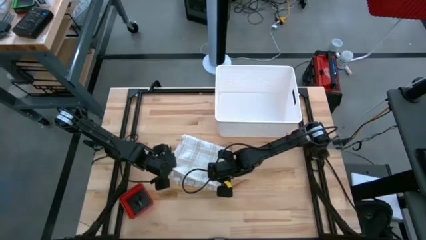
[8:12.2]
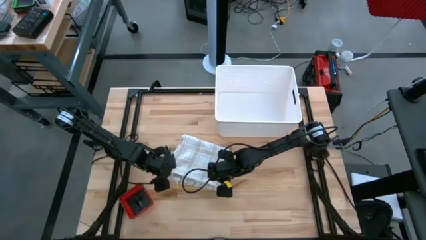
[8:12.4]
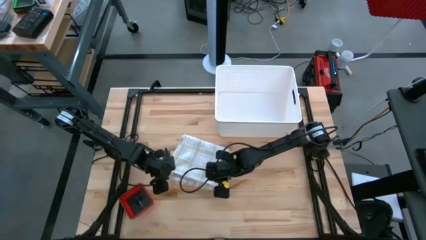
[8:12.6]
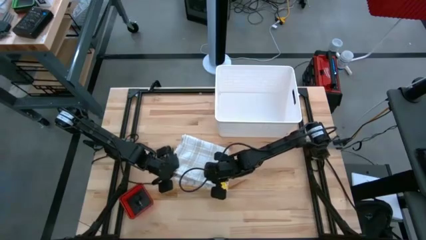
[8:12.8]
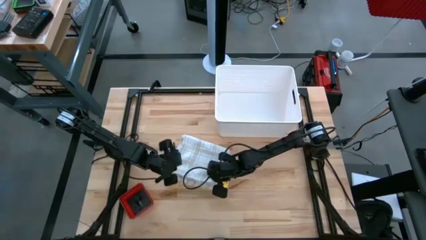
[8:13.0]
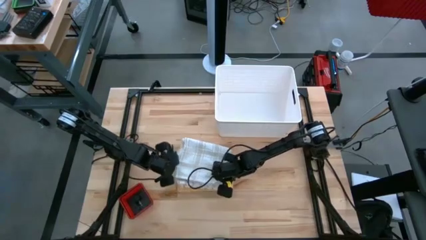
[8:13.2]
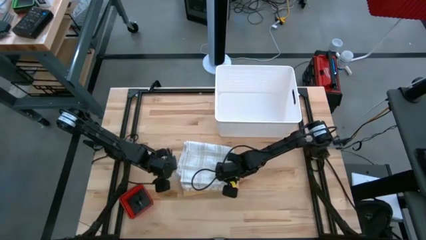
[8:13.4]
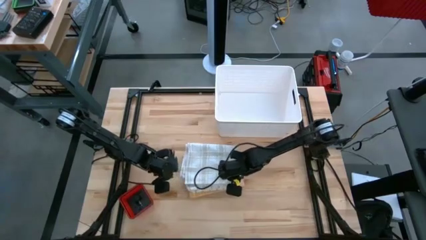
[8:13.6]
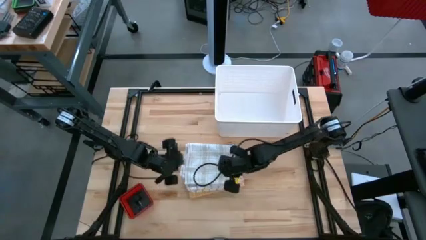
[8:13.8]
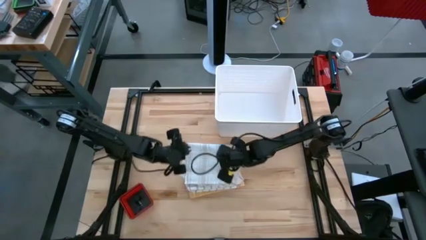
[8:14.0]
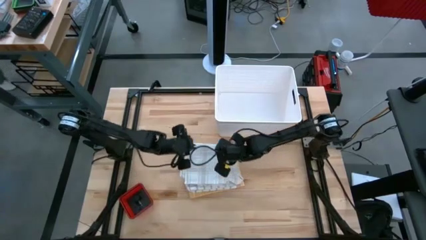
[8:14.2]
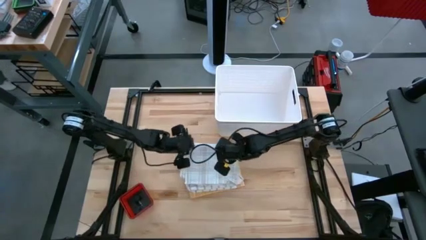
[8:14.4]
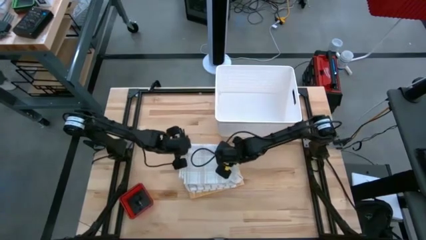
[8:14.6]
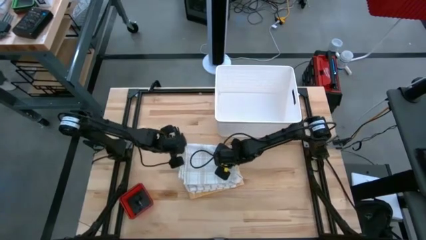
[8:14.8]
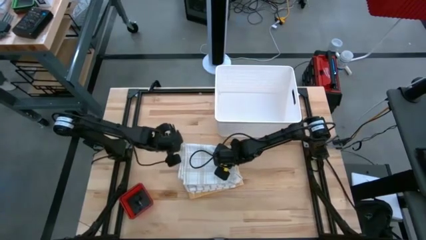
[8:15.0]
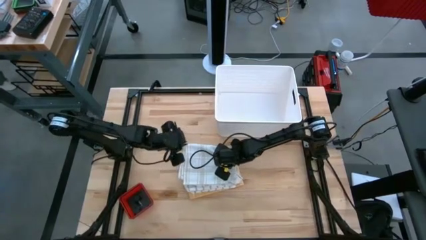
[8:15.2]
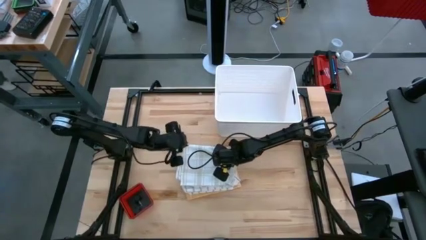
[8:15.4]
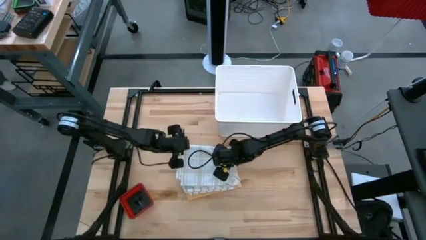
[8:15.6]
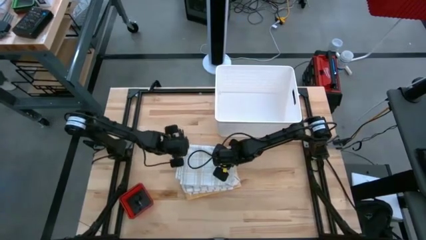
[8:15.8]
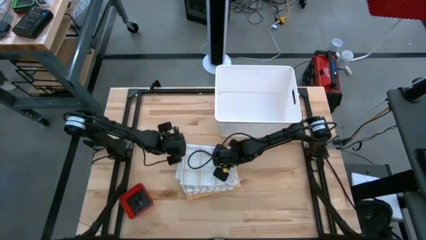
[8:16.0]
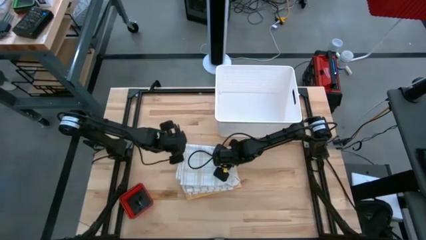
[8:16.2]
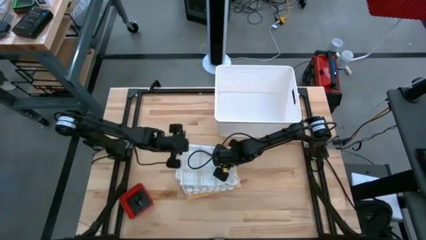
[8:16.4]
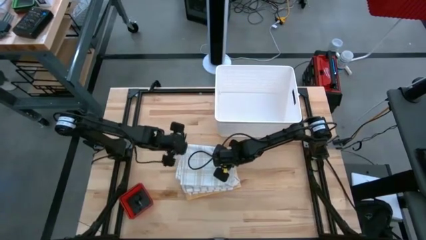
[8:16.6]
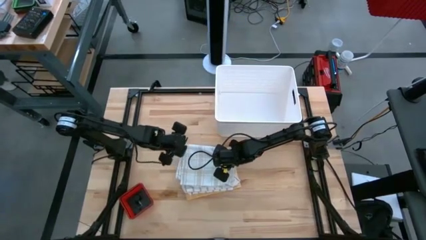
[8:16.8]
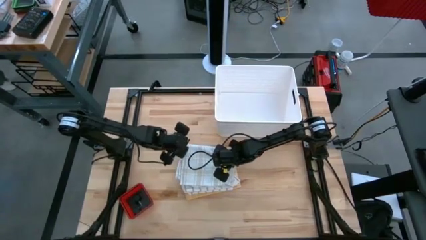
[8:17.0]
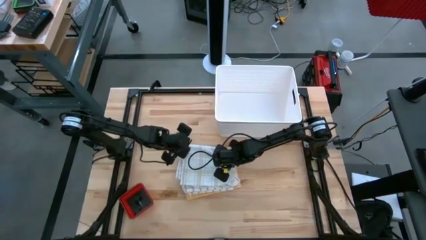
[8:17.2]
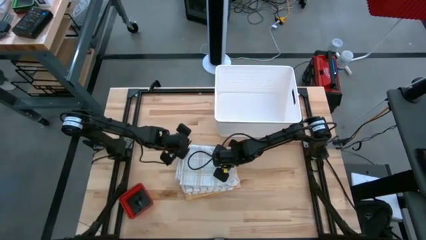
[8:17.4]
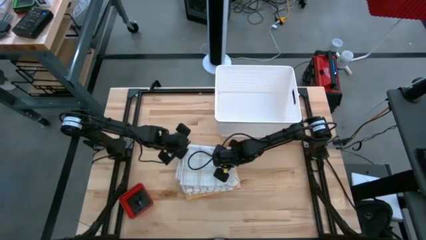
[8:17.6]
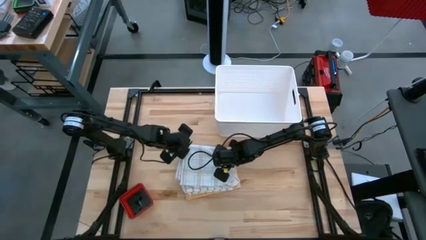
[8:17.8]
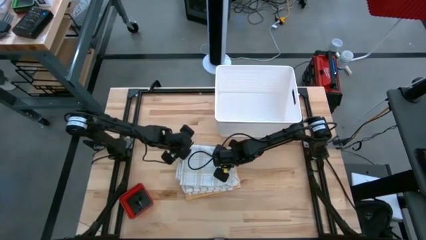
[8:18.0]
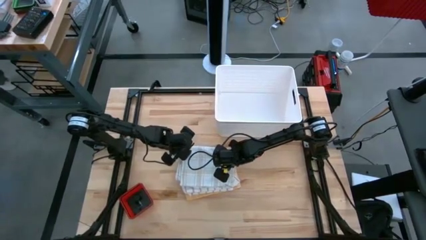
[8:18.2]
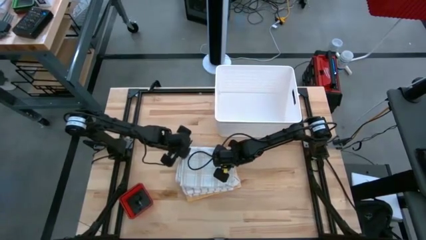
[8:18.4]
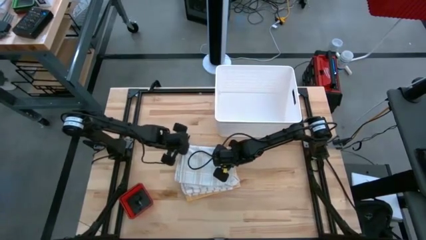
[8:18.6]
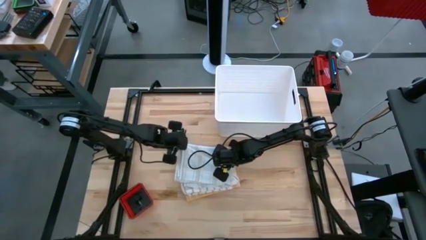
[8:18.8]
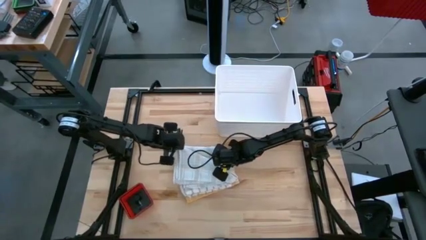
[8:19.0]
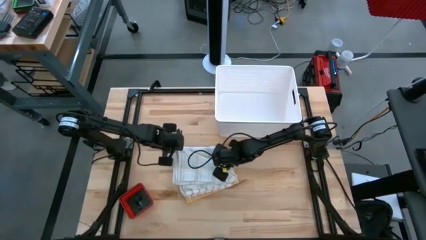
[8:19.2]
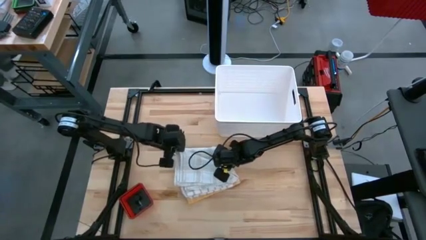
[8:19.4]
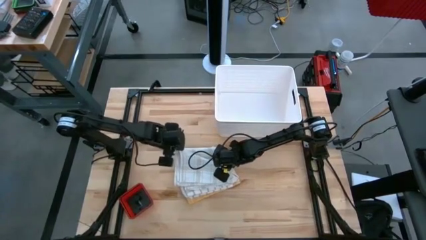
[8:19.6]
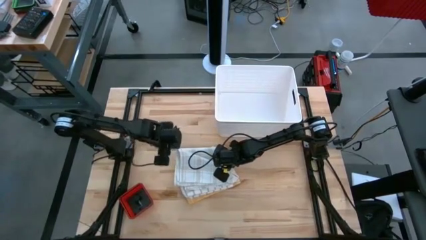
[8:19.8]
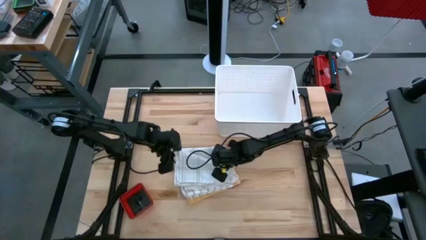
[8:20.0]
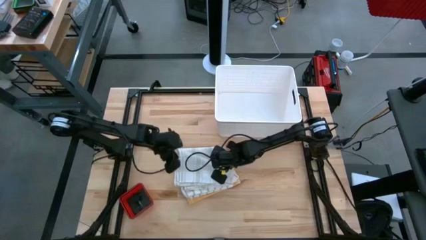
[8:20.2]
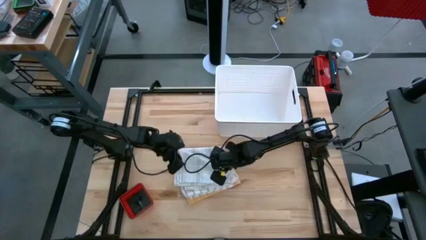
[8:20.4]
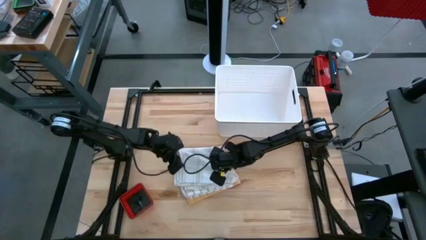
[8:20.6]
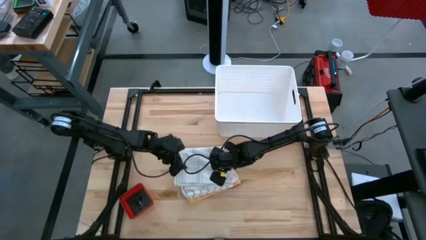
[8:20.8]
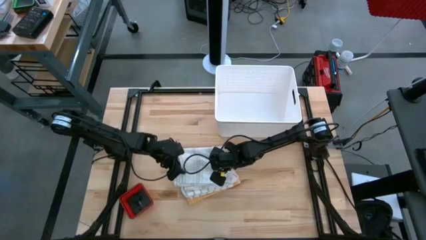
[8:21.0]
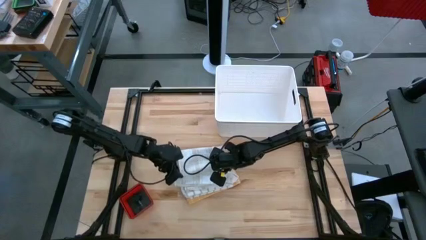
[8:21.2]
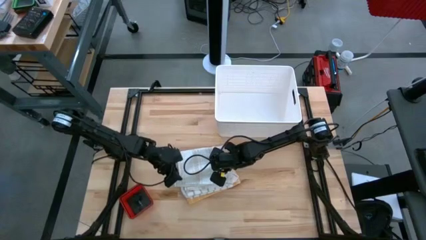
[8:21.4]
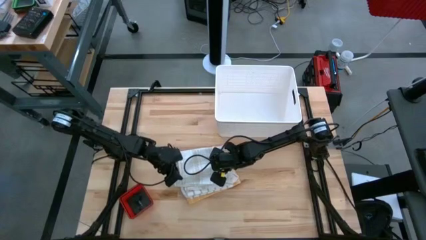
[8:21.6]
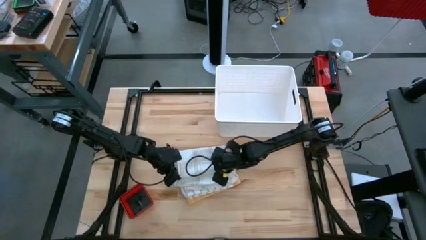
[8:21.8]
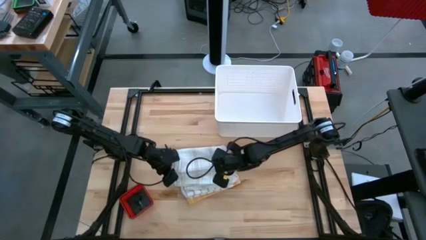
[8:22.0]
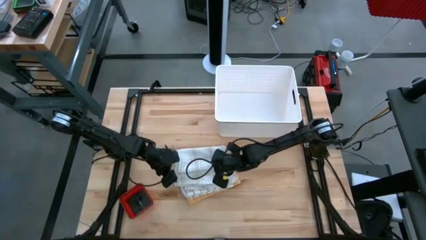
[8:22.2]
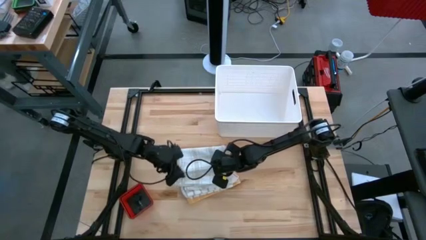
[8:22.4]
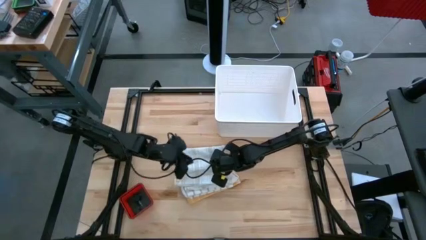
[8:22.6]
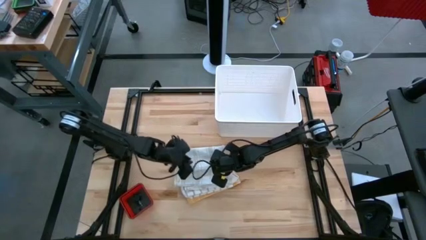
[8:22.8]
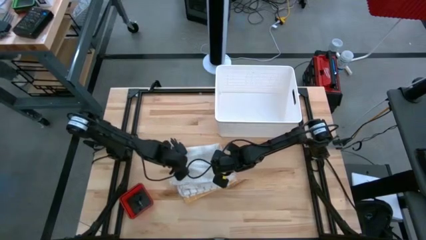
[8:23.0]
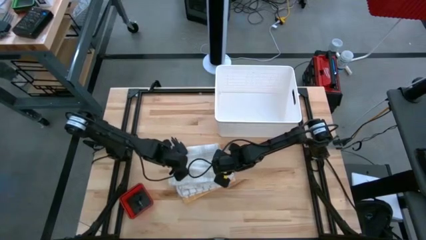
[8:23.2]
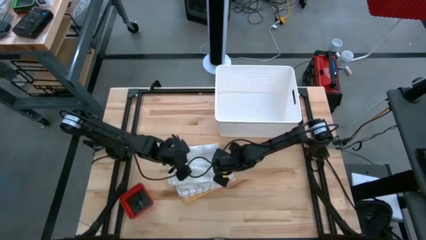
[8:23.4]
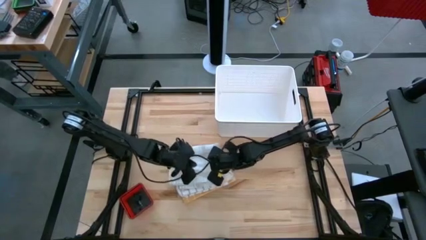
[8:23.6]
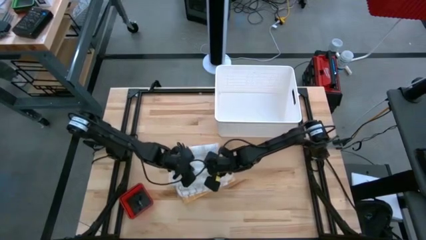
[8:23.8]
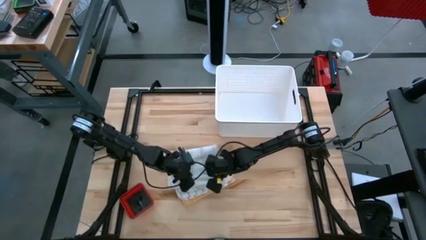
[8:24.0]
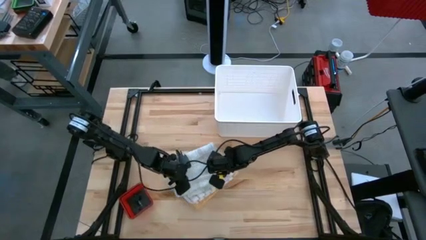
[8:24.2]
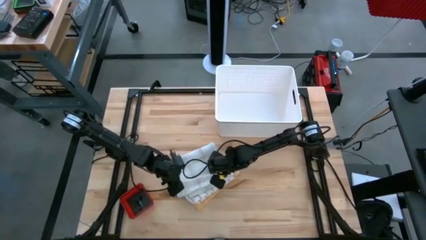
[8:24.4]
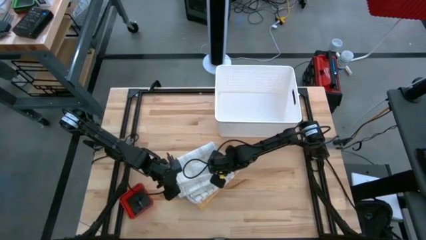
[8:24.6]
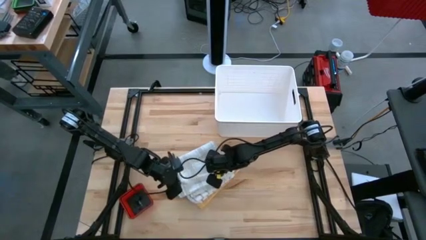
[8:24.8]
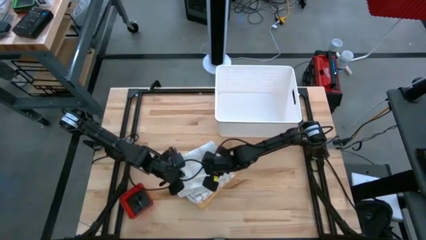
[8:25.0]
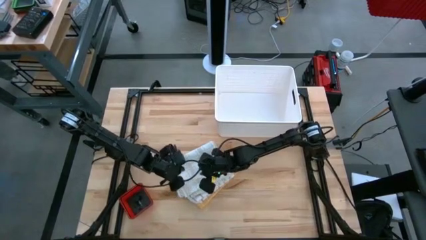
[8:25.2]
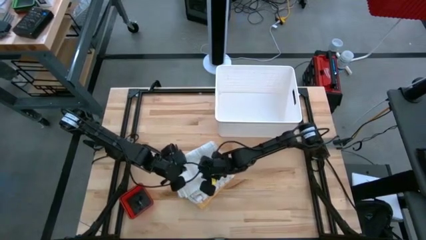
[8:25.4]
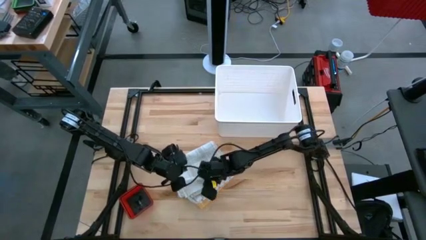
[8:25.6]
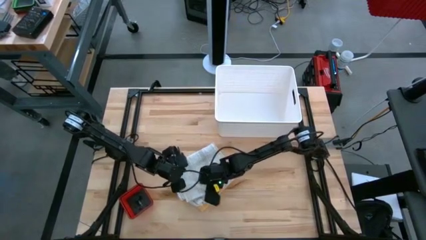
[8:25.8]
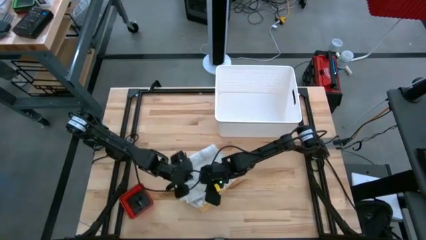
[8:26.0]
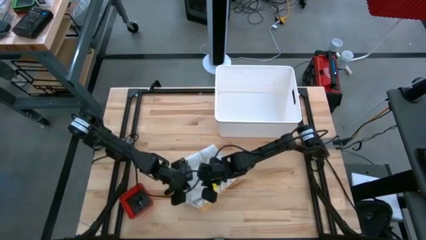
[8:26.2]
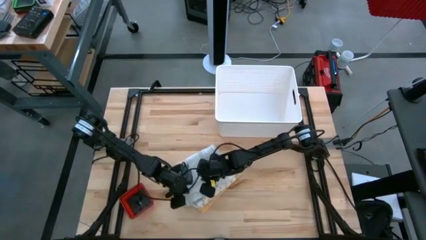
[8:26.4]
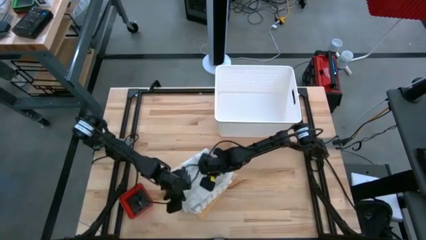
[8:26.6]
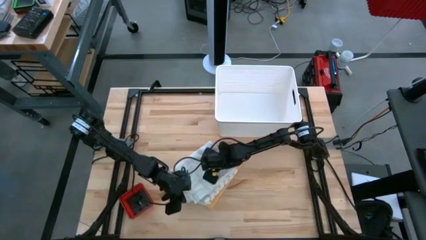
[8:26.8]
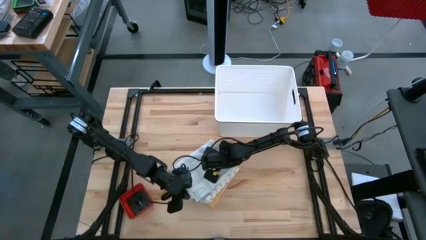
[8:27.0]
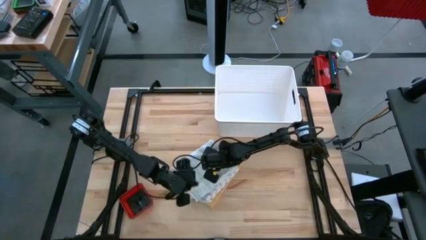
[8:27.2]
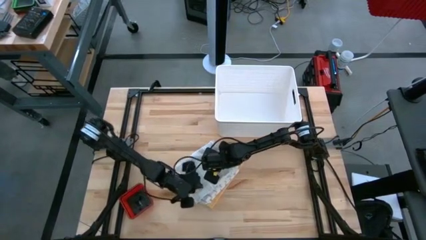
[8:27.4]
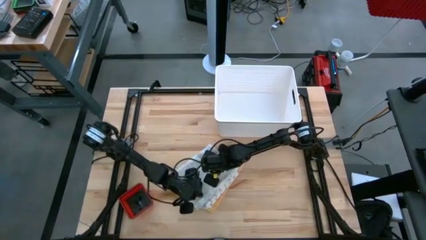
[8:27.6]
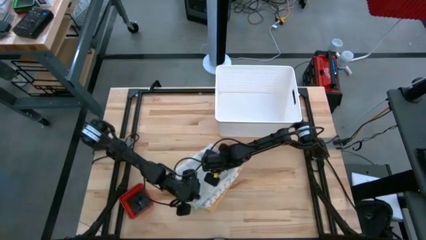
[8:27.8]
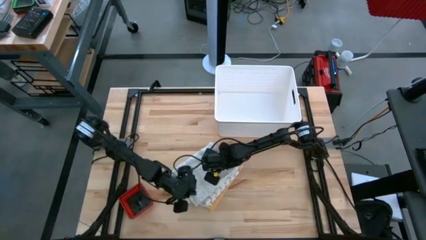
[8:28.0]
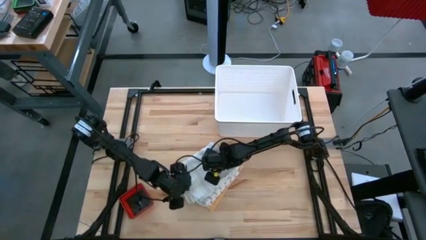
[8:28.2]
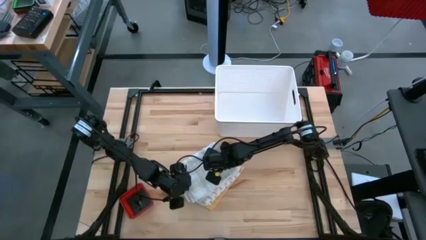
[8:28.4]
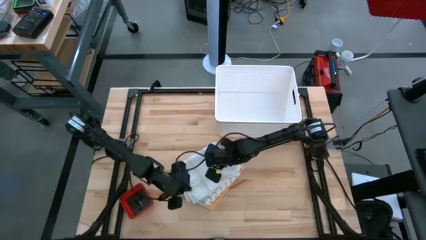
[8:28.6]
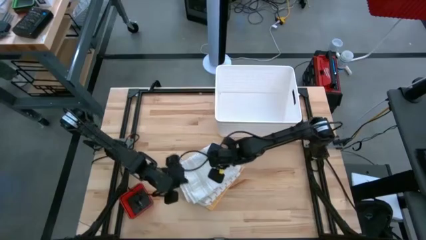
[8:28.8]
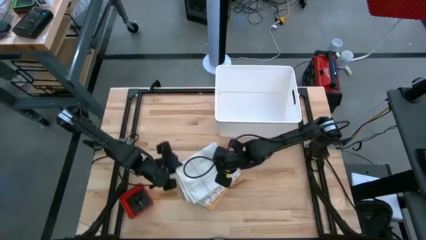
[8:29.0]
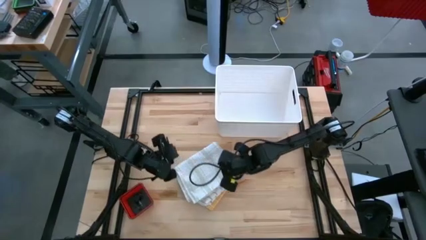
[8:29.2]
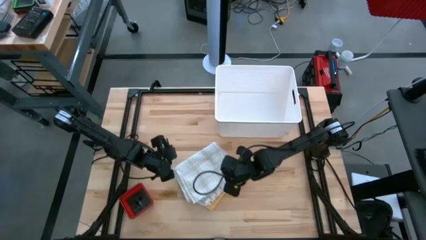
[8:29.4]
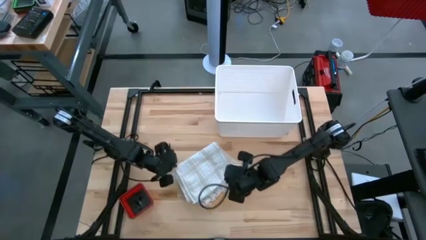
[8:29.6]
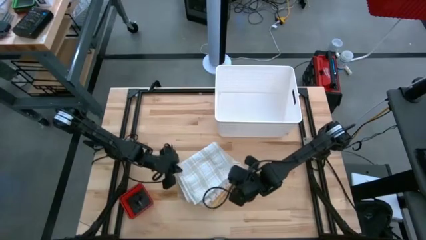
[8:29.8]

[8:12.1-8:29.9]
Task: Fold towel
Stack the light gray patterned towel on top of the brown patterned towel
